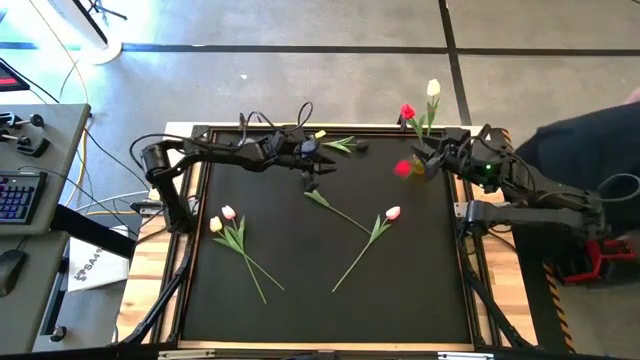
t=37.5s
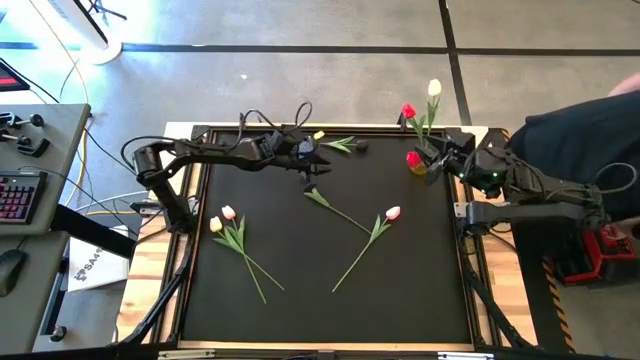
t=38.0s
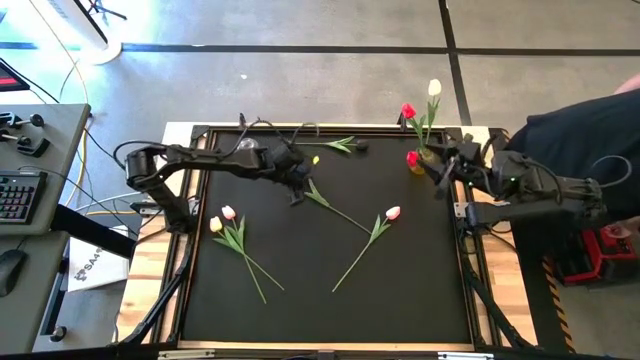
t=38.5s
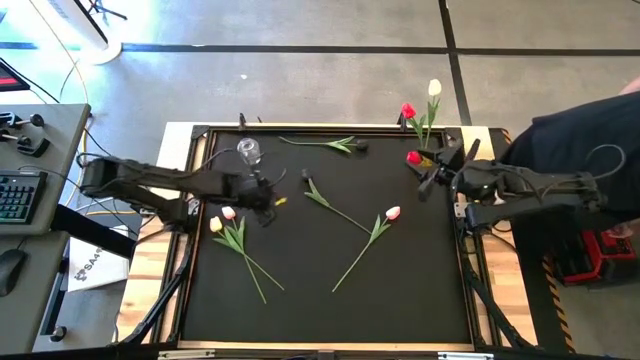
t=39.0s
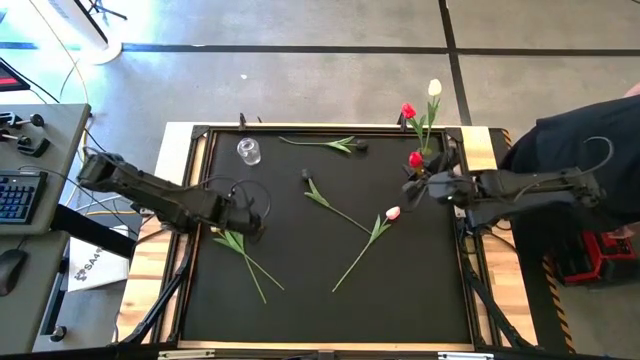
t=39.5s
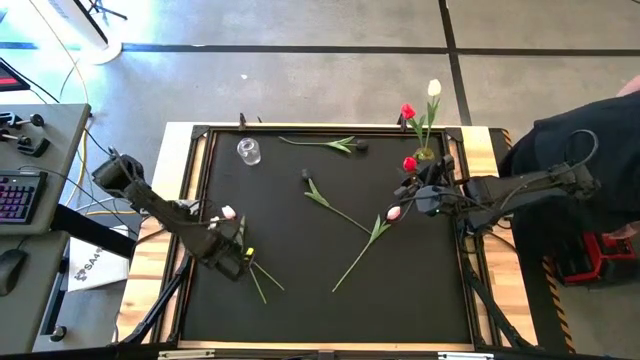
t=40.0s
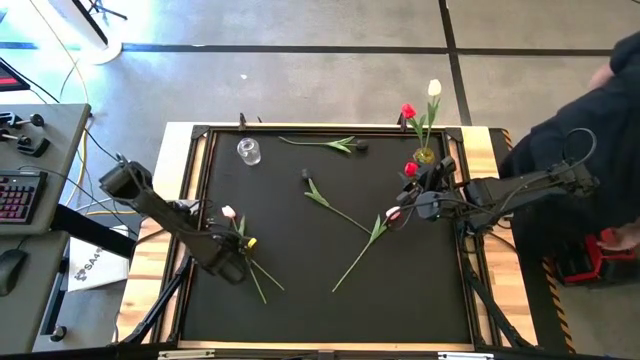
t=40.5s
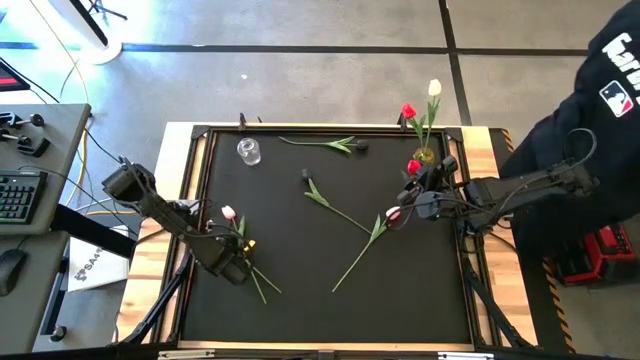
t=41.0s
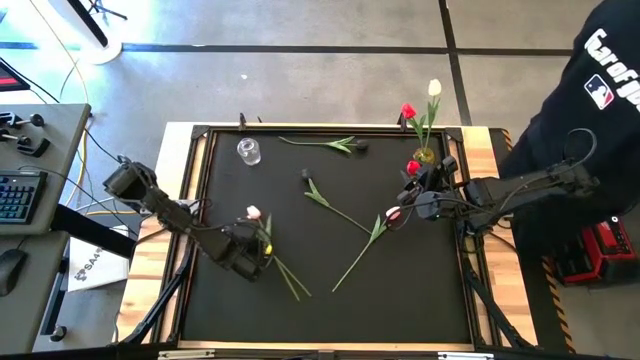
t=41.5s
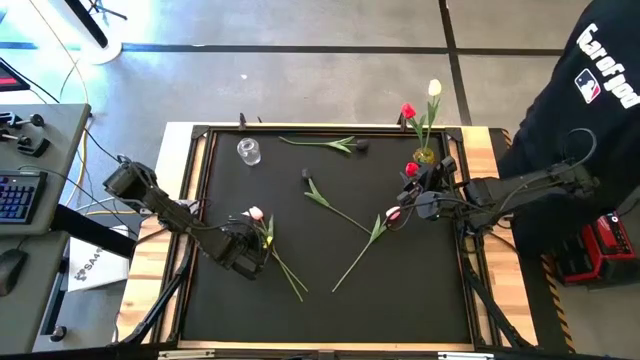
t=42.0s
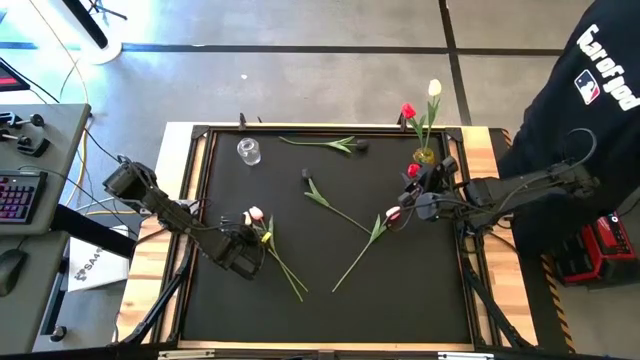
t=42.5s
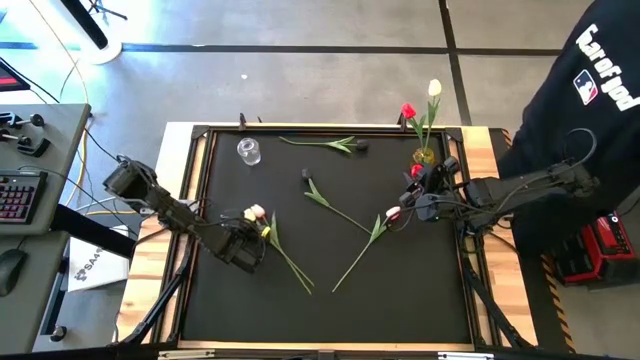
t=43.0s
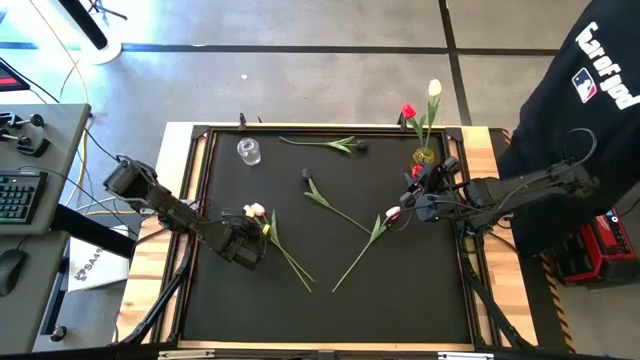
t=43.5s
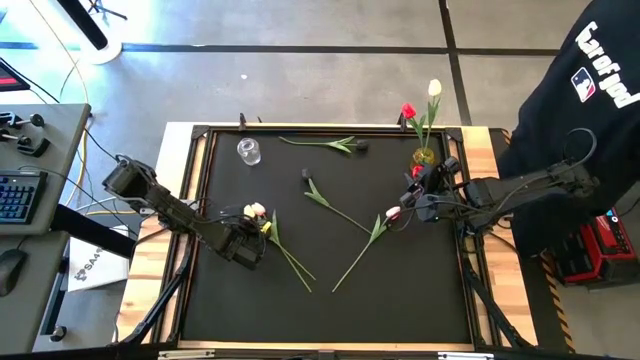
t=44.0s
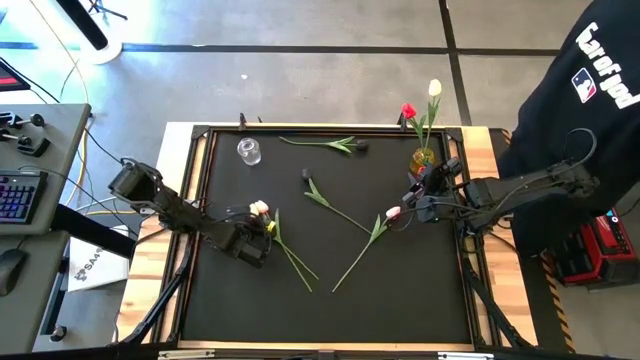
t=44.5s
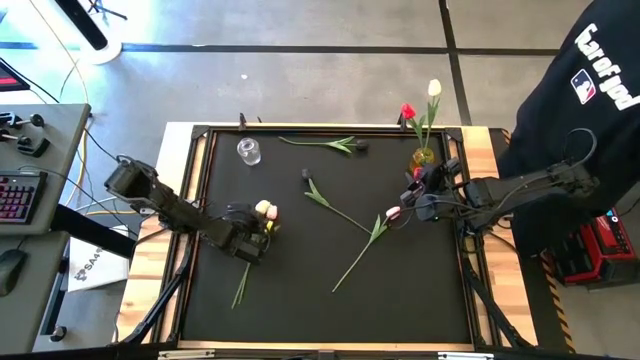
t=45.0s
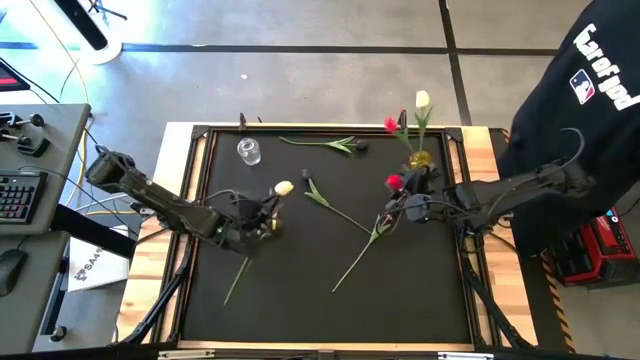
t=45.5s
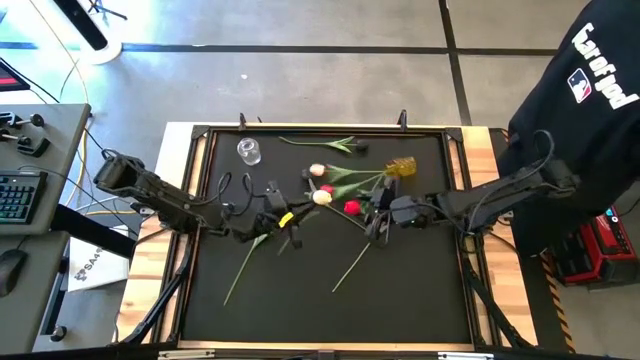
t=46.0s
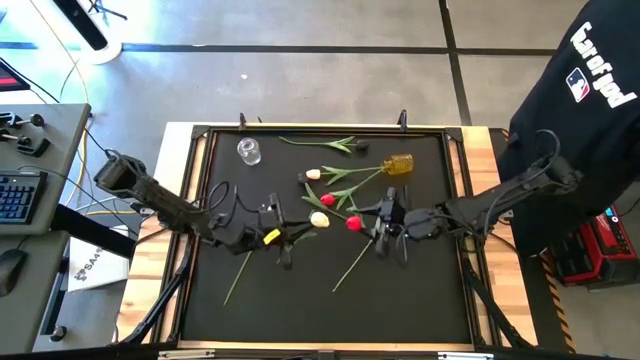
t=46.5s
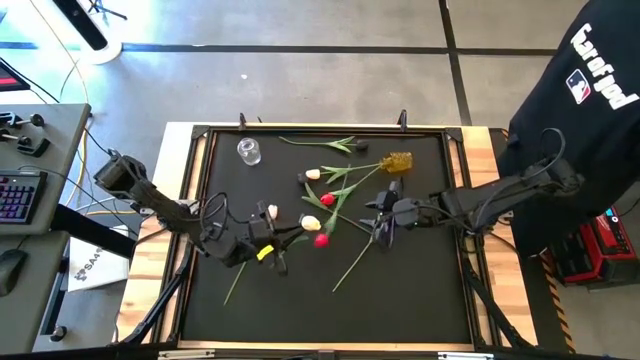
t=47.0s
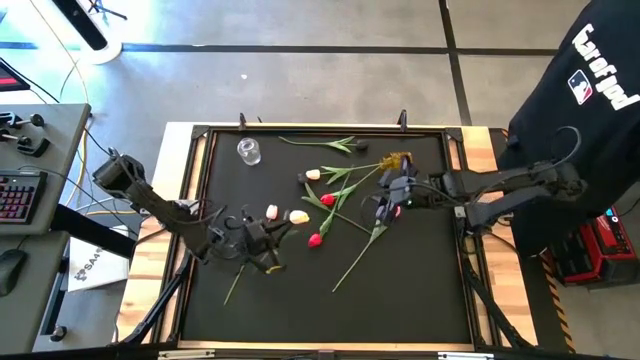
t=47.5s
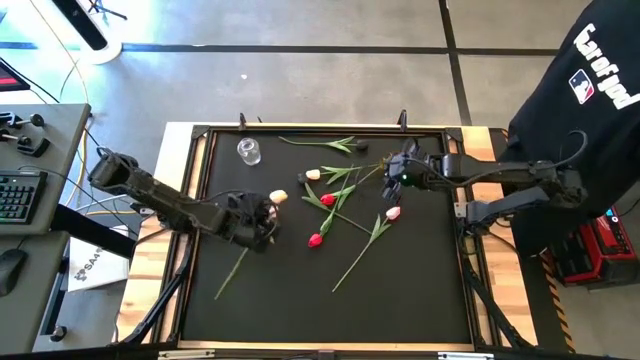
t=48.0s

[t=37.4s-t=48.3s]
Task: Sort flowers into vase by color
Put the orange flower into the yellow flower vase

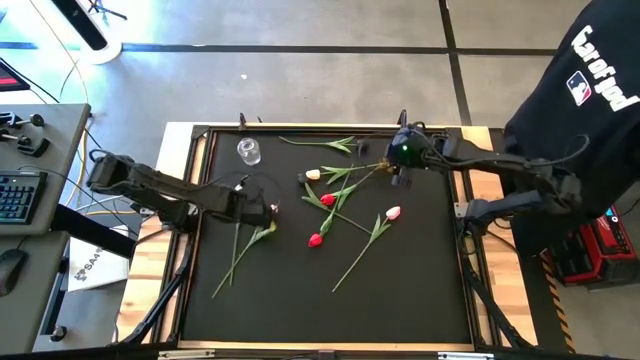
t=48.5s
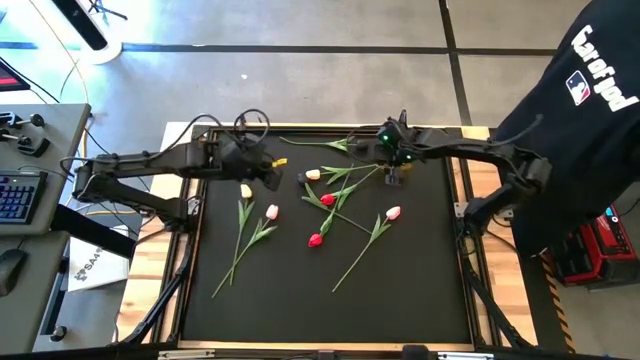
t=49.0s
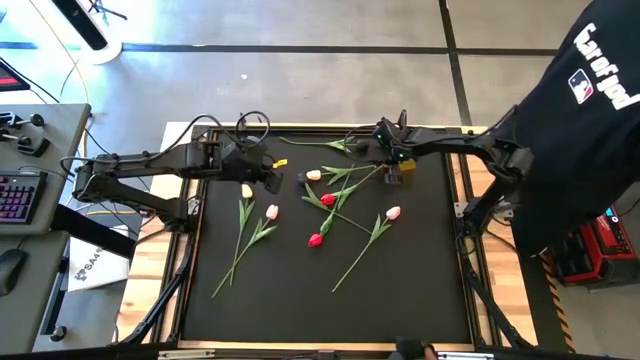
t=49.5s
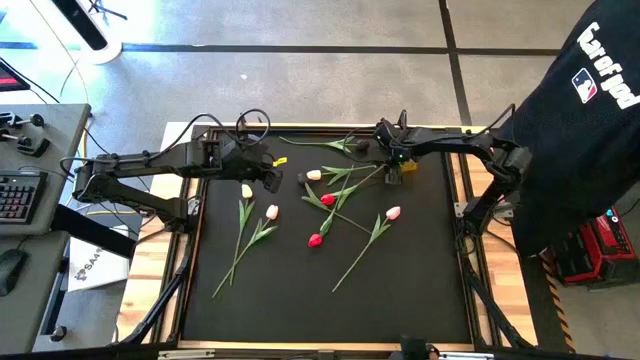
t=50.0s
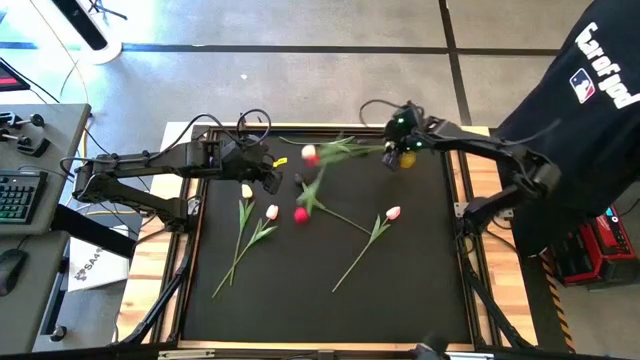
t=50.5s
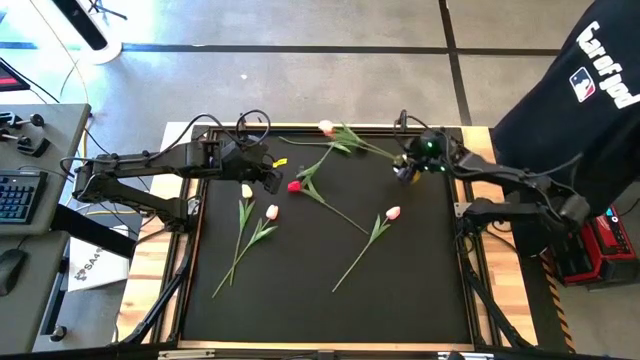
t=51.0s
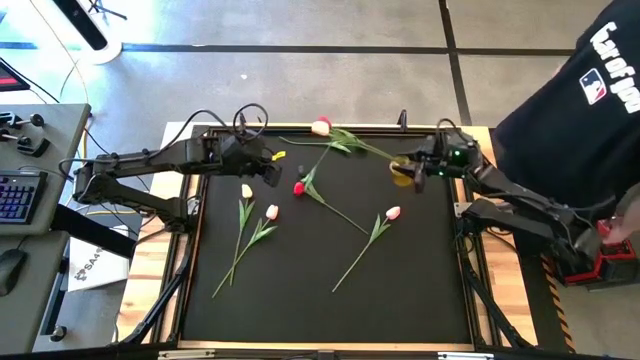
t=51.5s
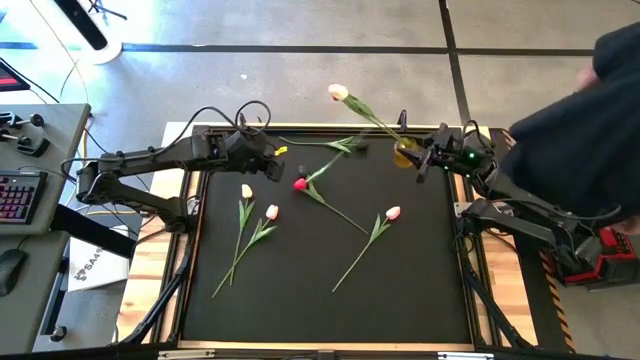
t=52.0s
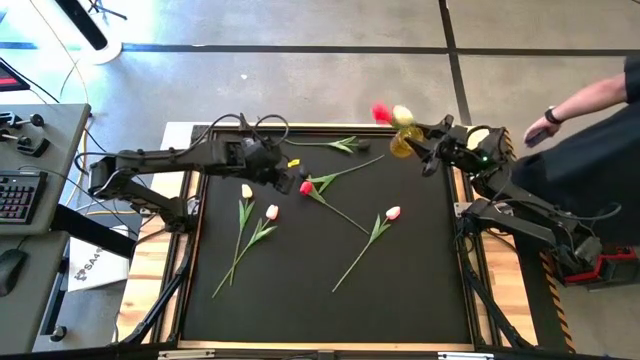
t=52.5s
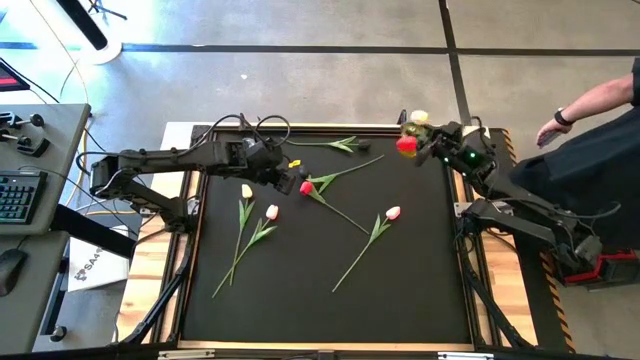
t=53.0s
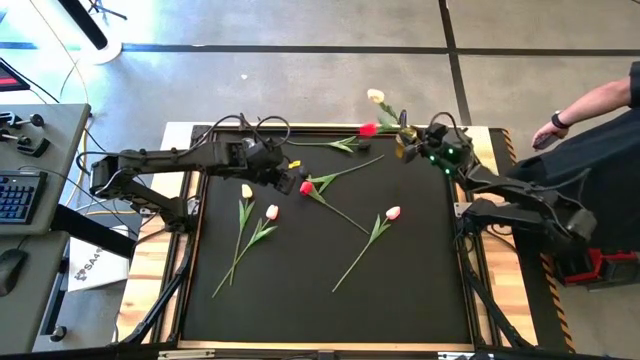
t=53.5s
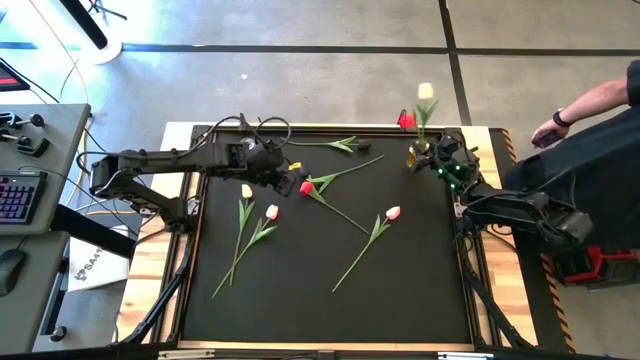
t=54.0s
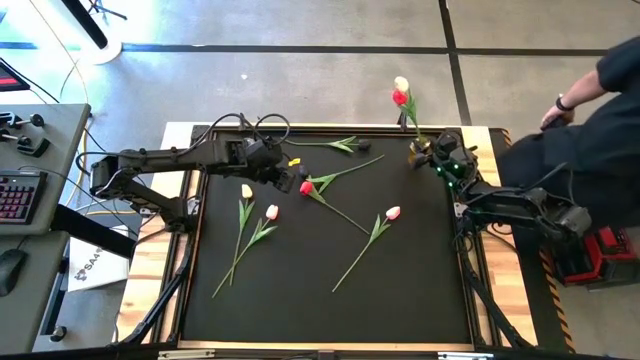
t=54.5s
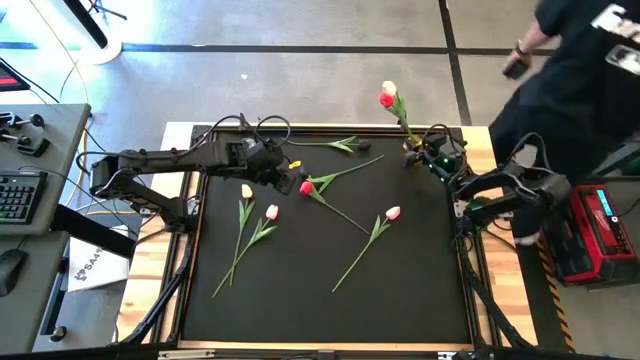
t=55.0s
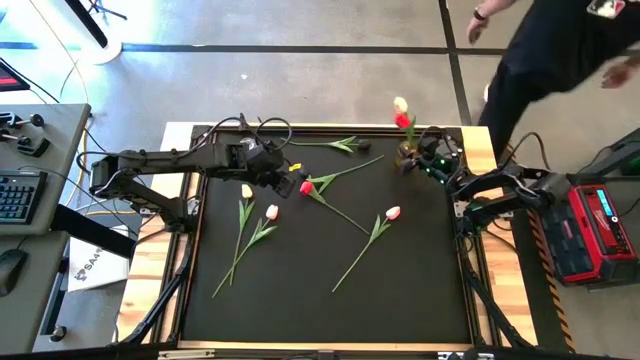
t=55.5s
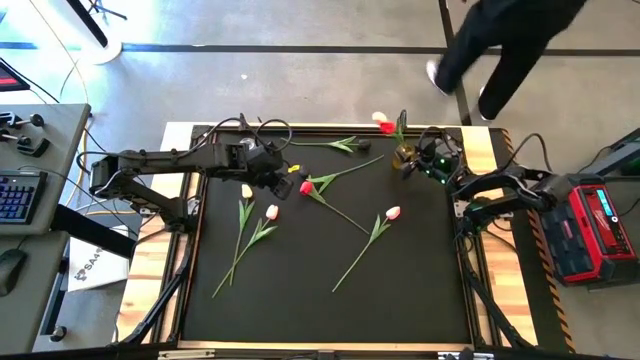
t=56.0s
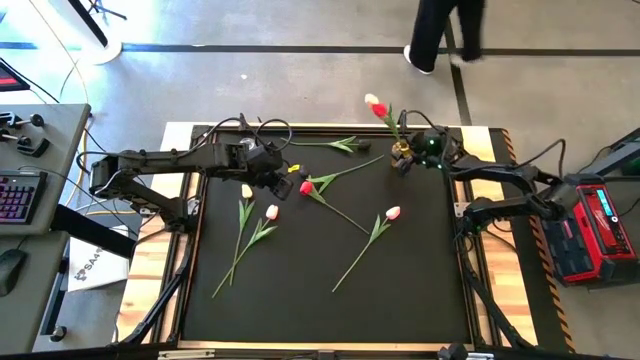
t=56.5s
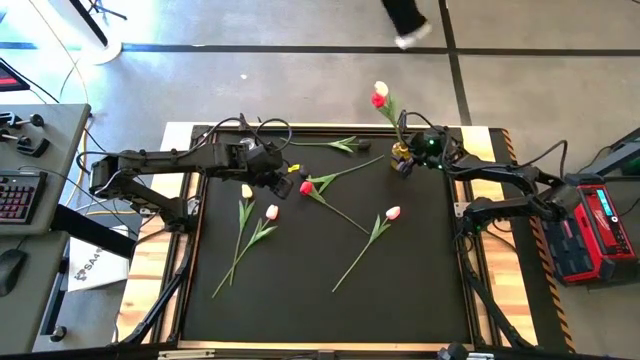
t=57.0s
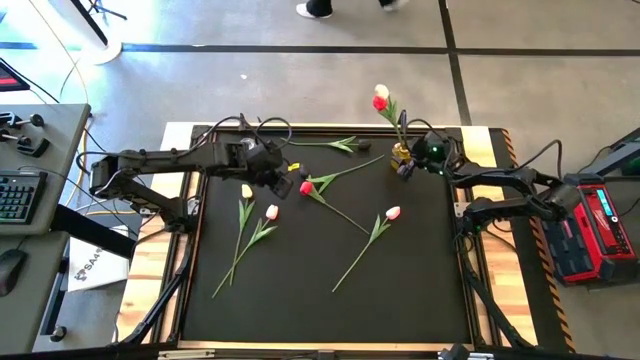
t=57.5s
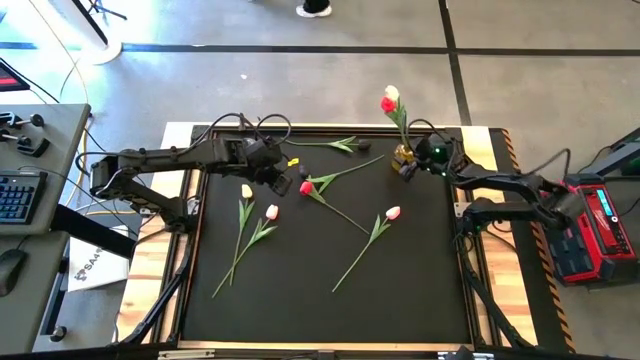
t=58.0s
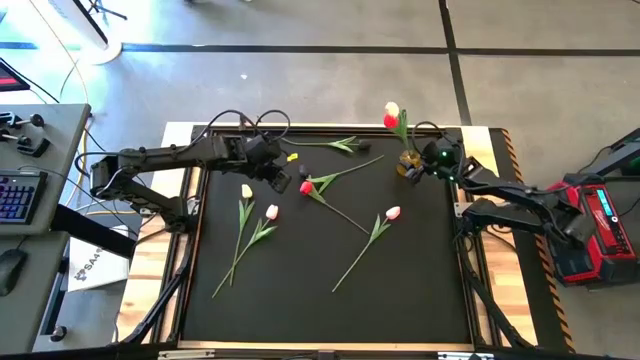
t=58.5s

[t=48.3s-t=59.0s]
Adjust the yellow flower vase
